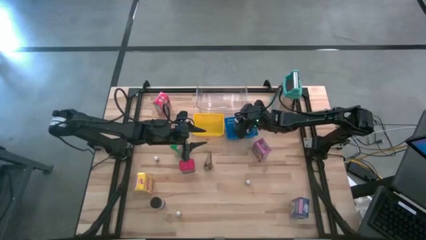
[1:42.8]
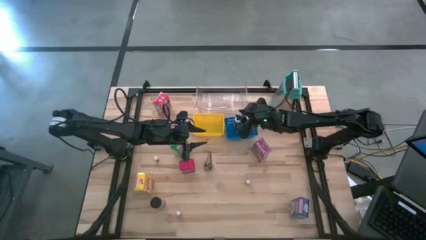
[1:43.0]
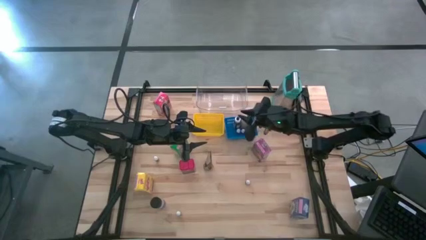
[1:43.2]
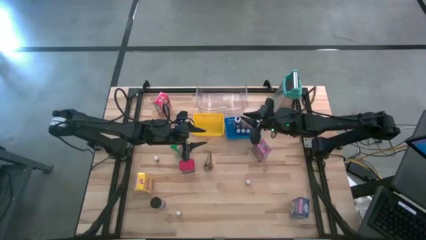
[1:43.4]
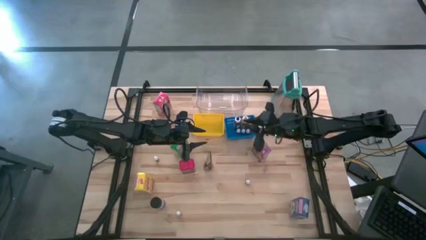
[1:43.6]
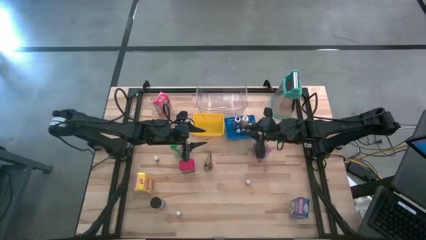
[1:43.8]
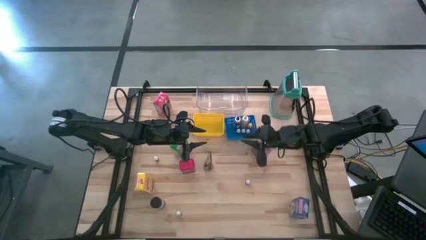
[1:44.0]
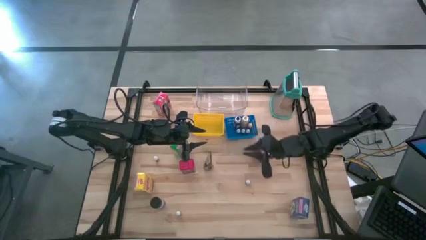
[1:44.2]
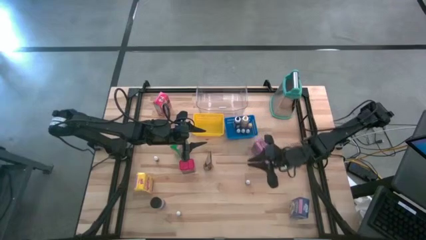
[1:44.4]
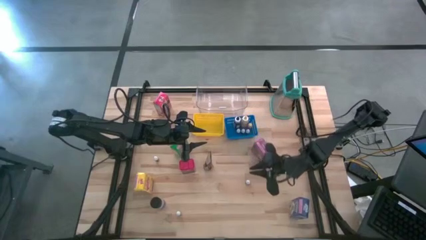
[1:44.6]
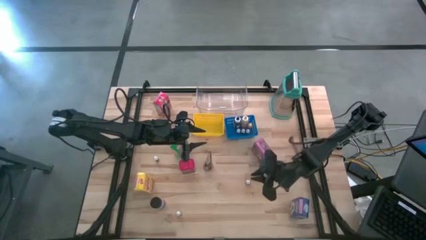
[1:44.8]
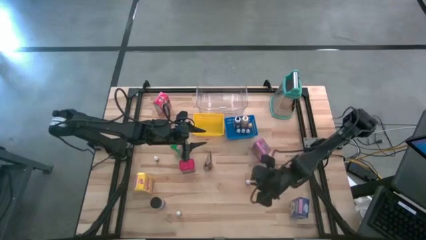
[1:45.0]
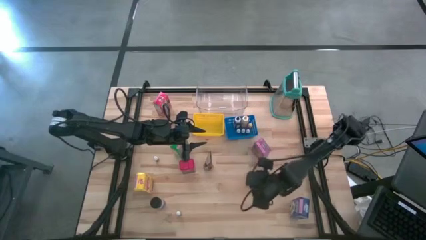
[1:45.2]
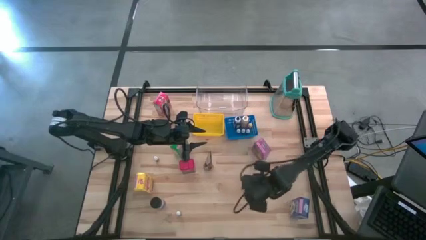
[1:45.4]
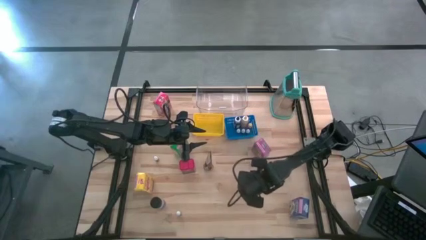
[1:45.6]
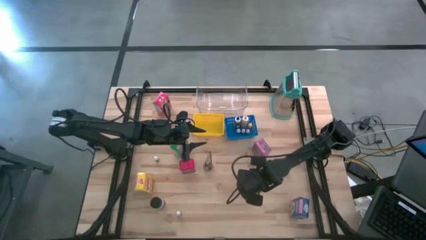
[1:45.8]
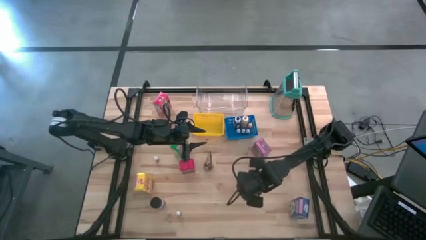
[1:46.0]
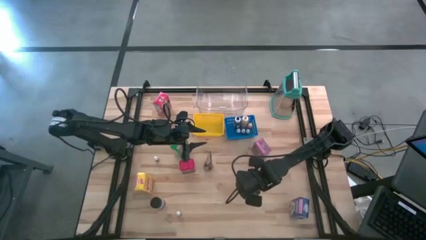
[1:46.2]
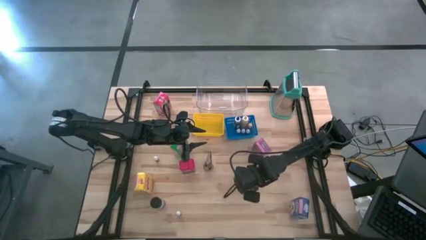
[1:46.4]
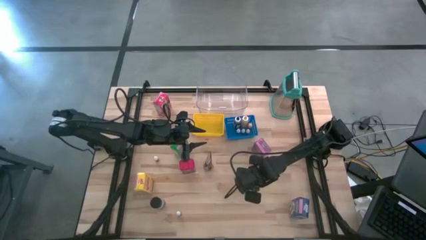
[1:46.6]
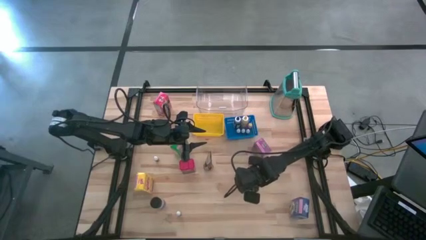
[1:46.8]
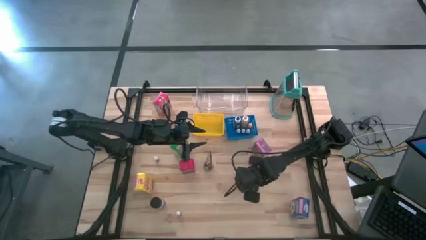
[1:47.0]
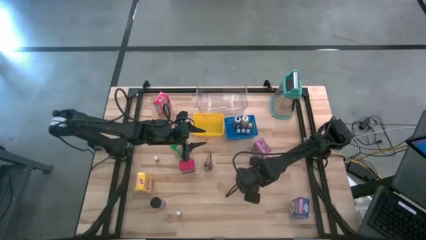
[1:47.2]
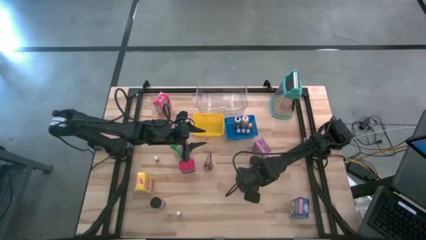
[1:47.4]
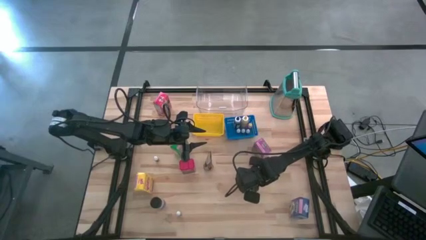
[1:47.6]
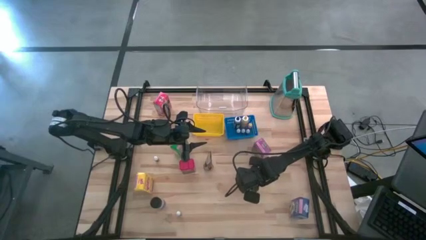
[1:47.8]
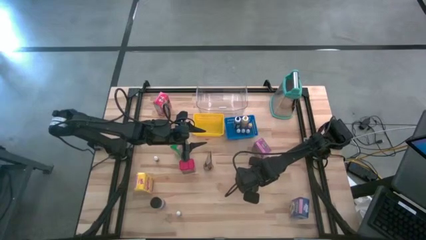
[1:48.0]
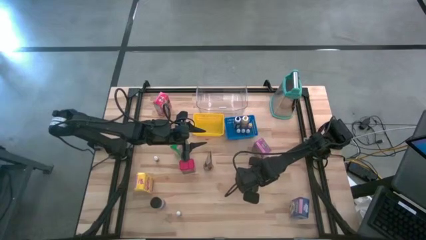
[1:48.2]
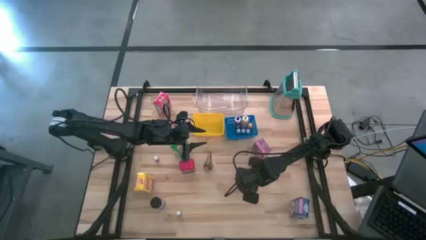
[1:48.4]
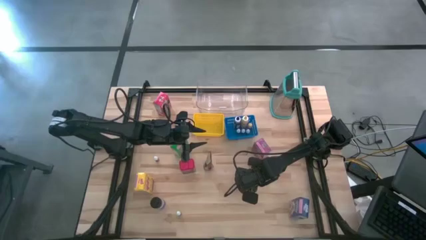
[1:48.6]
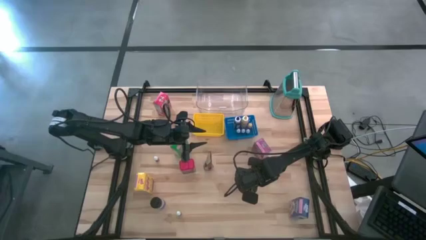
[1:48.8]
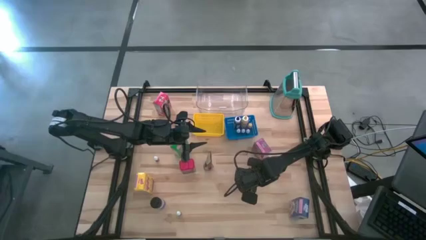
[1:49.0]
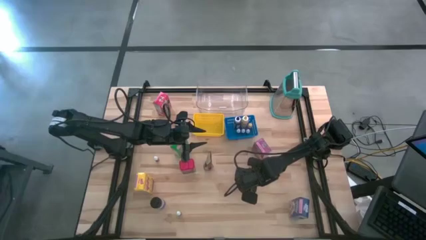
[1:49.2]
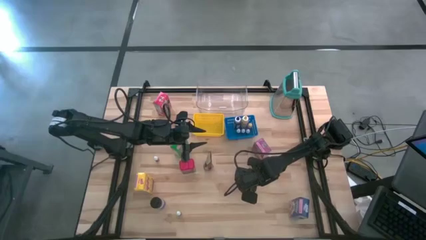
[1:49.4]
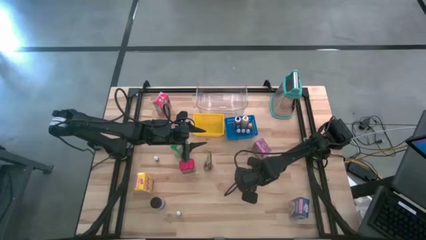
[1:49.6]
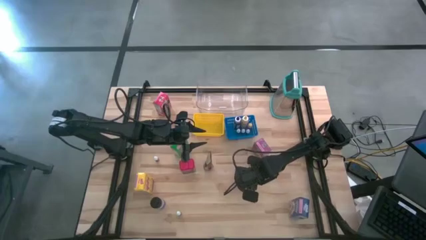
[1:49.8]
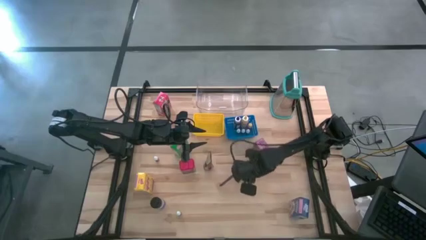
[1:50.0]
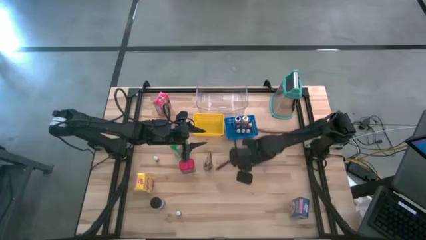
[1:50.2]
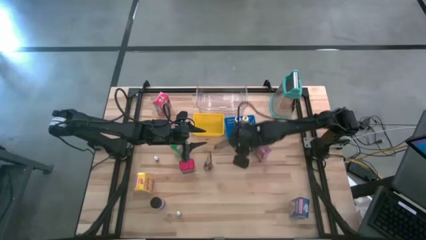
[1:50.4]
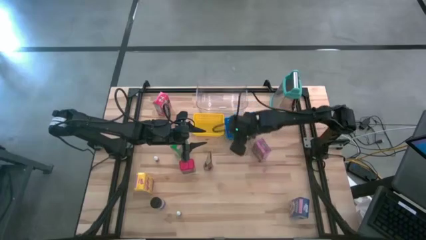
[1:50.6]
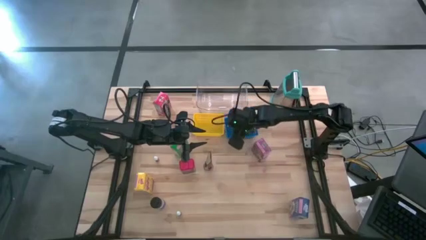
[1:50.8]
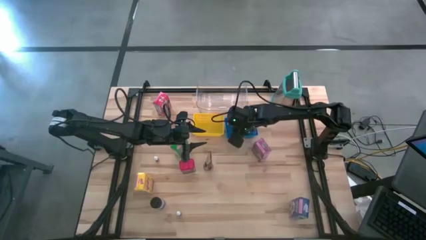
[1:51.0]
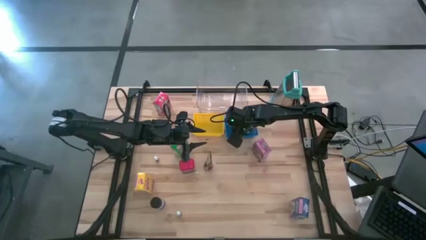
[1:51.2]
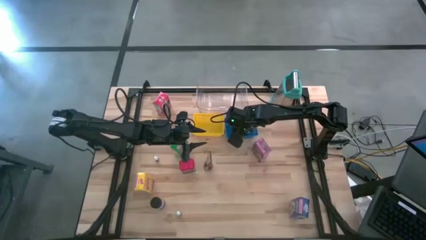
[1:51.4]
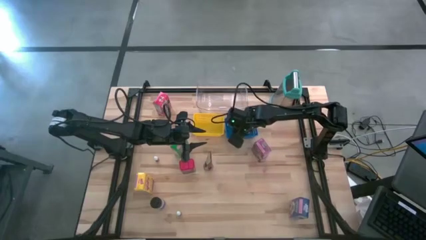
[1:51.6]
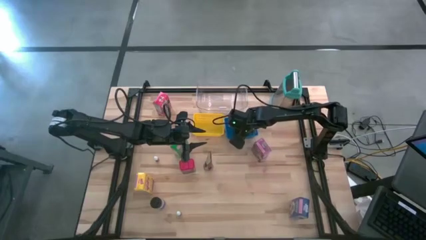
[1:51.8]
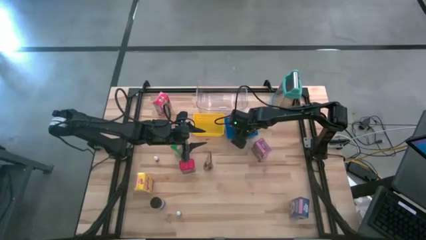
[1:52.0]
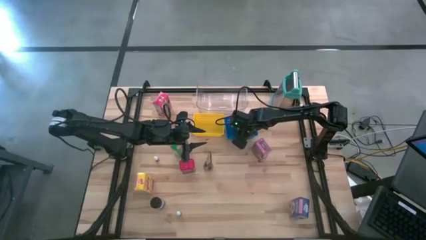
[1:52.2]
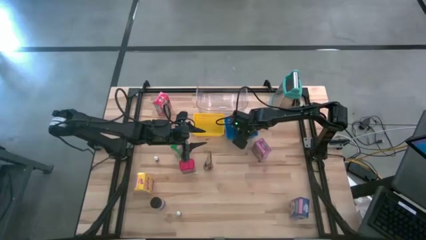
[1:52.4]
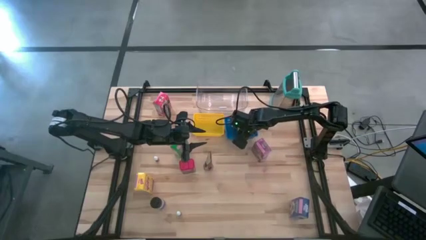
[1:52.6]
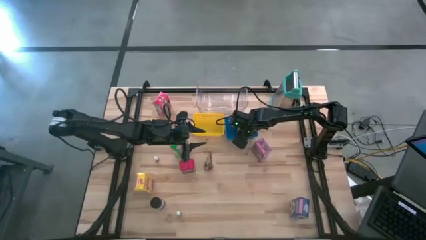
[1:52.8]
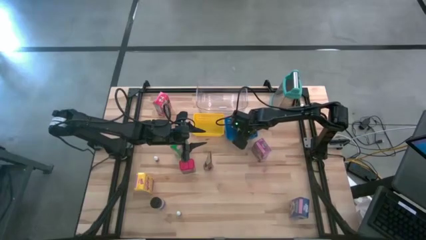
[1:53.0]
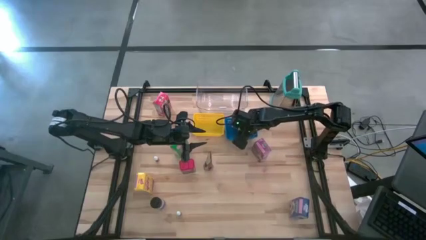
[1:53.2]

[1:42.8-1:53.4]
Task: Pick & Place Kitchen Items
Put the red food coloring bottle into the blue bin

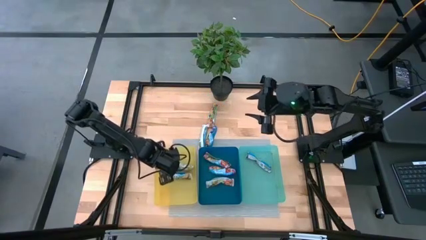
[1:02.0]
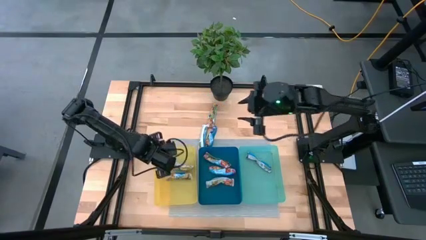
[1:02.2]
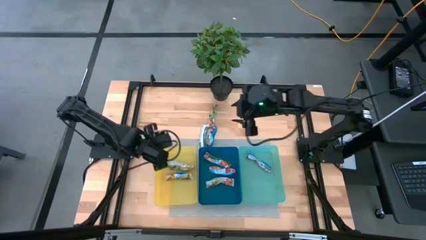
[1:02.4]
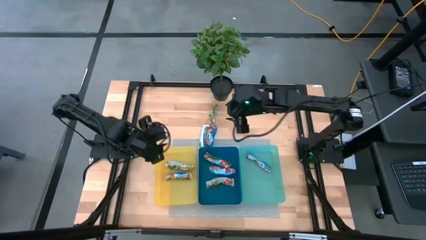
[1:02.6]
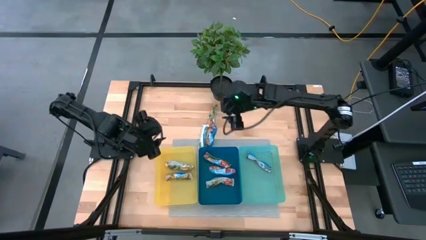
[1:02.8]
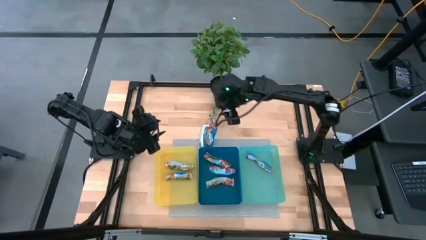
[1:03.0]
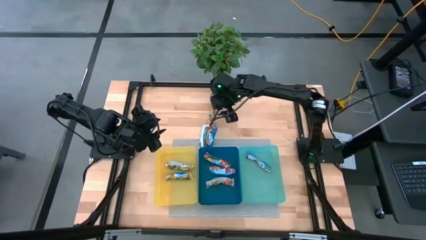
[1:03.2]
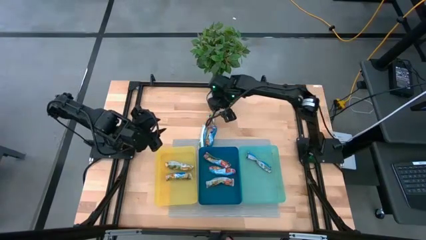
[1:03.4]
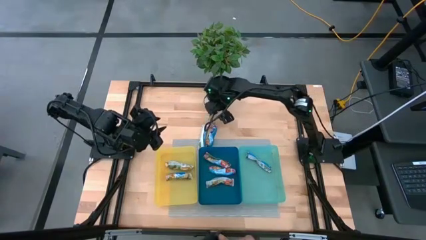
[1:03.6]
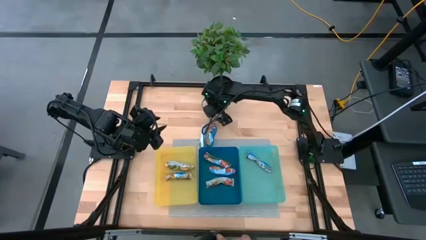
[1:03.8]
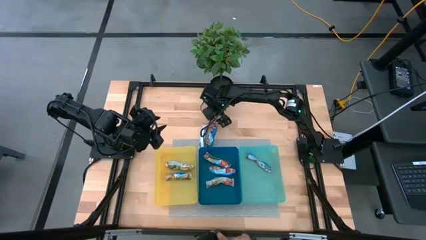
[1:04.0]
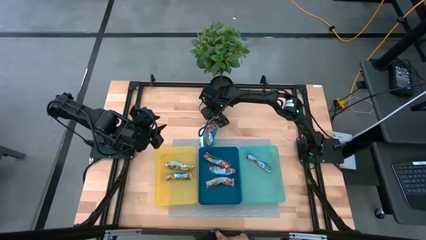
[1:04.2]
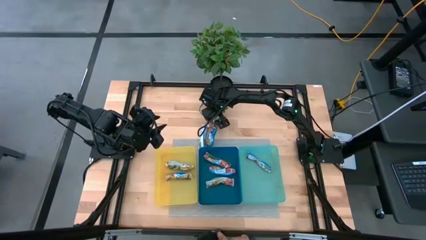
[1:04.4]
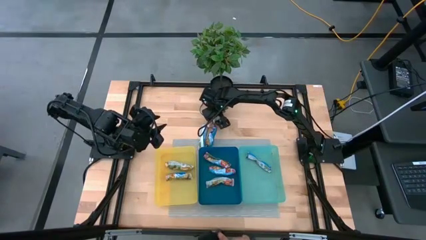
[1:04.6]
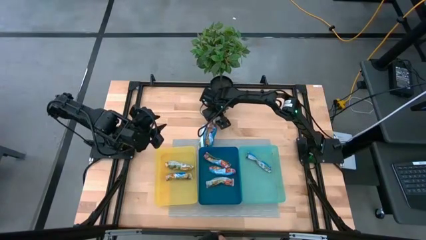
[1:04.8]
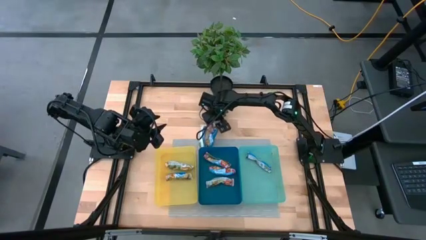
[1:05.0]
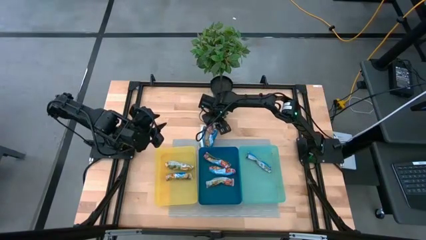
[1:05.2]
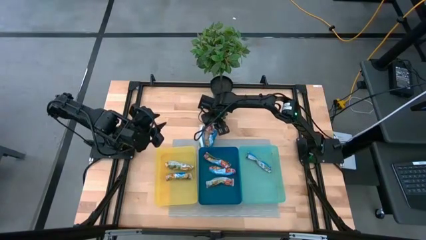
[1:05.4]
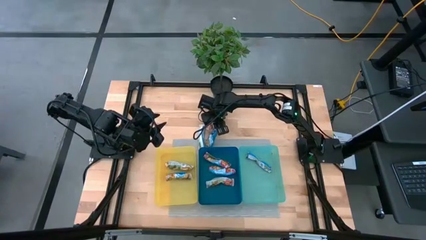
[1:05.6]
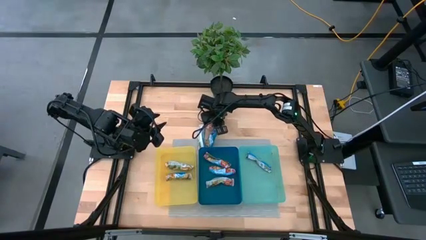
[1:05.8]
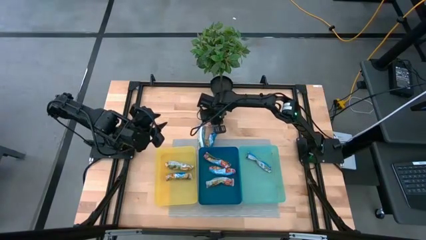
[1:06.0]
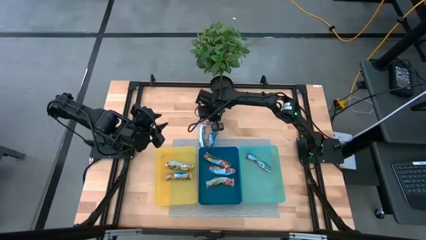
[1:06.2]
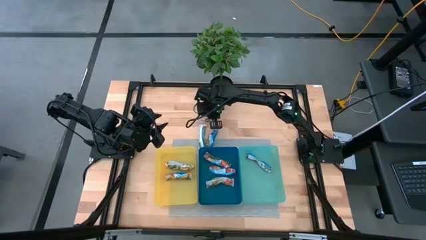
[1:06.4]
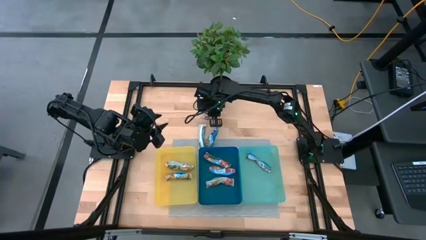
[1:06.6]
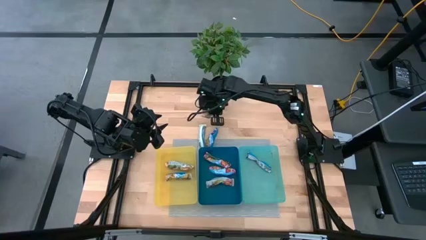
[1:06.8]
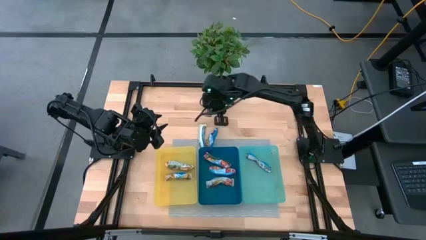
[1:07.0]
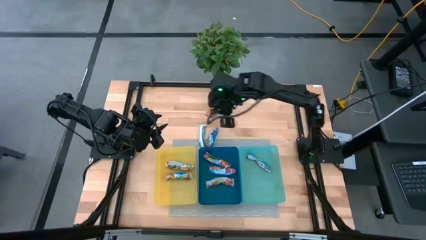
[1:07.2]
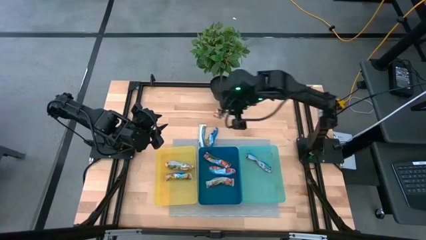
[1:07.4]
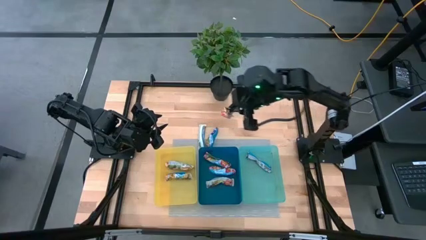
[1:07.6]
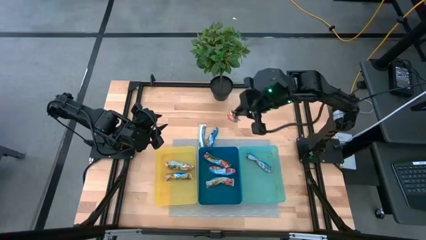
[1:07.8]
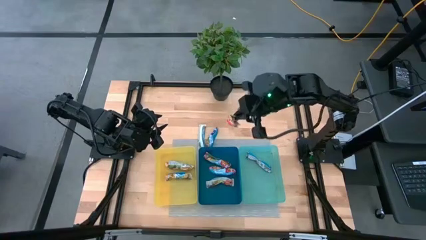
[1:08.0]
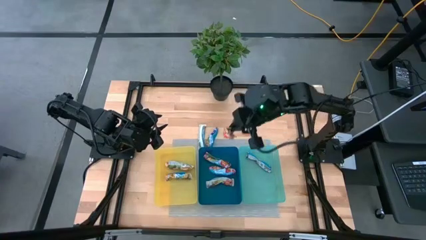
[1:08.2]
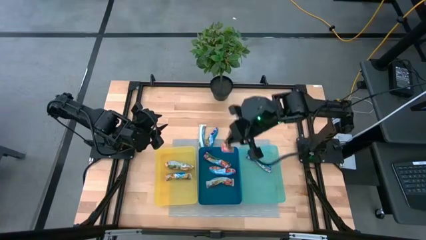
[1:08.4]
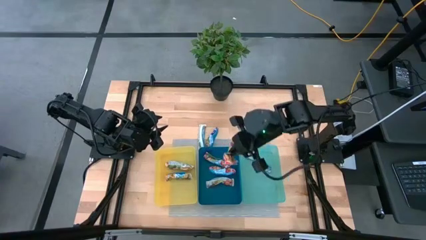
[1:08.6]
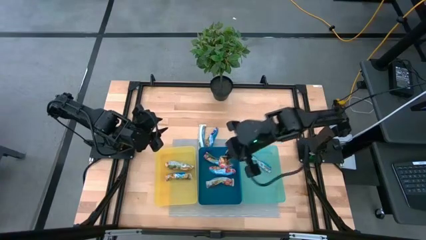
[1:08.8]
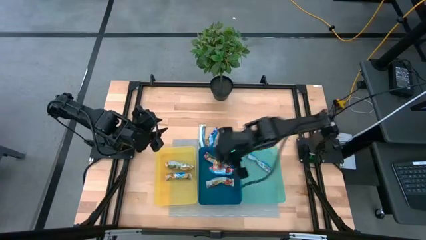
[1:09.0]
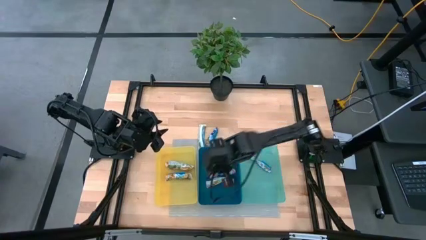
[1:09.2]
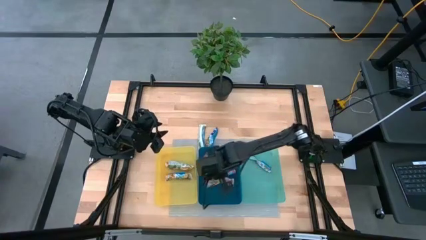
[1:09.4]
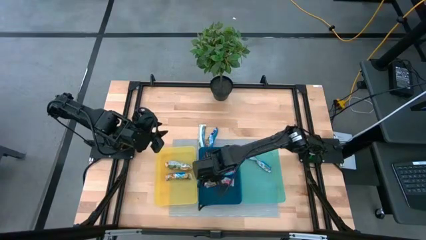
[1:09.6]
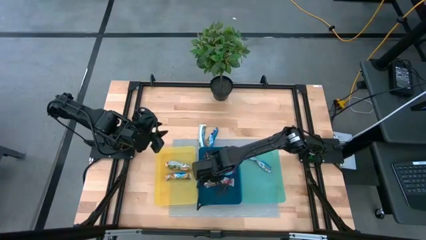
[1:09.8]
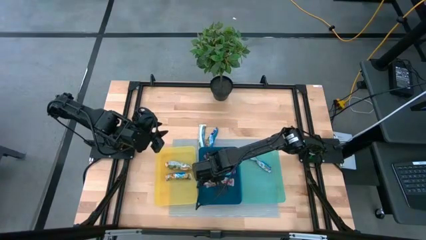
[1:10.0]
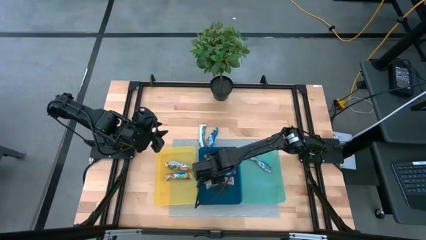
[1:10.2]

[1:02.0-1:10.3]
Task: Pick and place Granola Bars by type
Put the red granola bar into the blue bin
